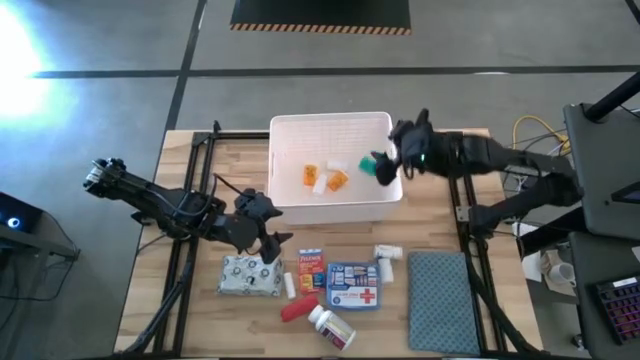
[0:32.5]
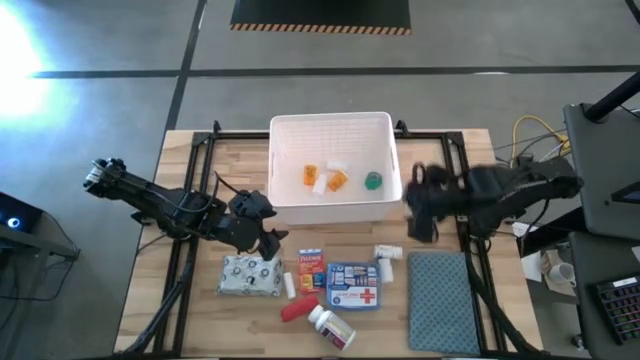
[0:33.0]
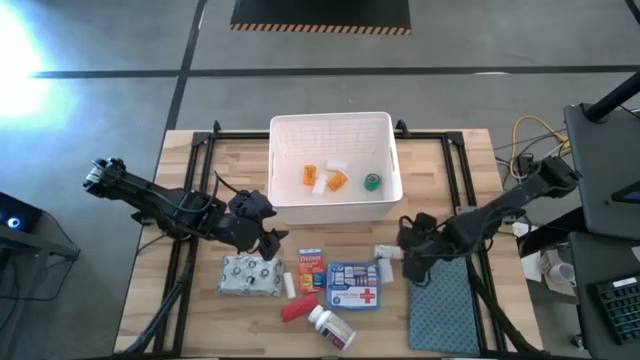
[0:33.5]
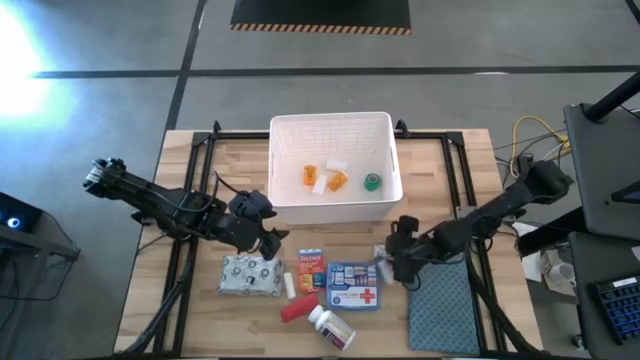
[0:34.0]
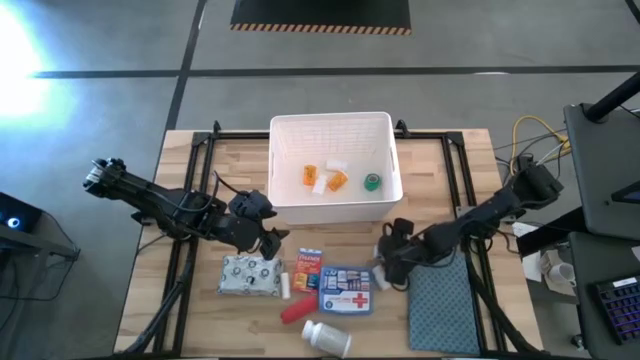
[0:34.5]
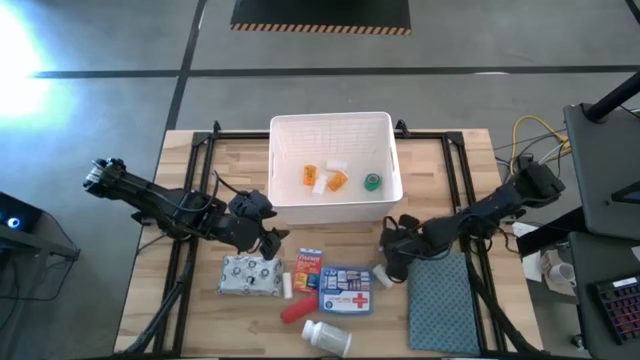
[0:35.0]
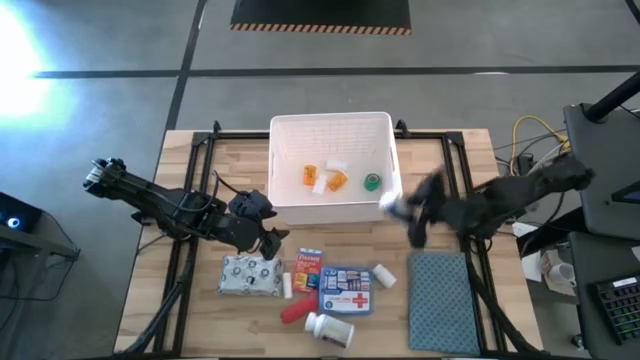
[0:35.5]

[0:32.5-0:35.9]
Task: Pick & place medical supplies in basket/bin
Put the white pill bottle into the white bin

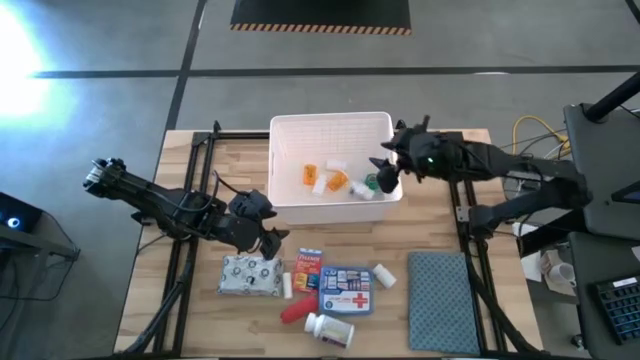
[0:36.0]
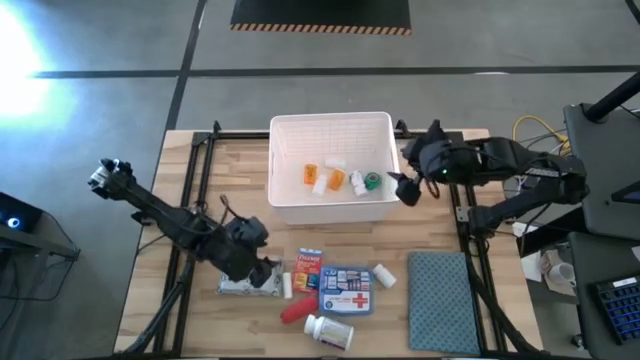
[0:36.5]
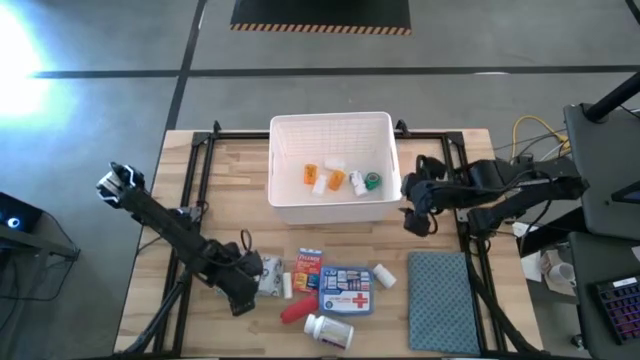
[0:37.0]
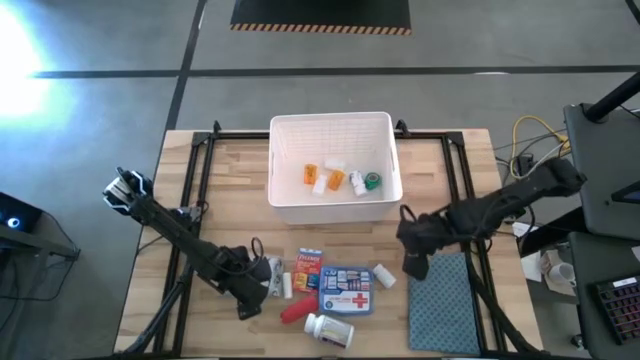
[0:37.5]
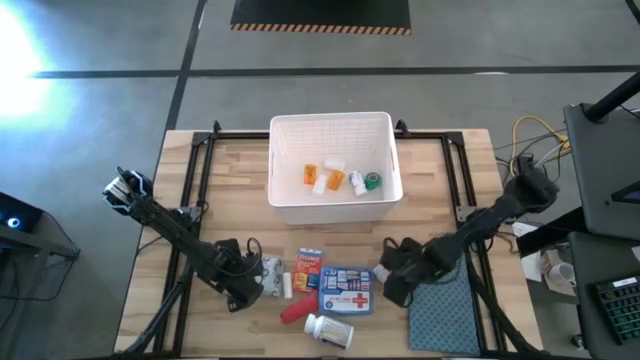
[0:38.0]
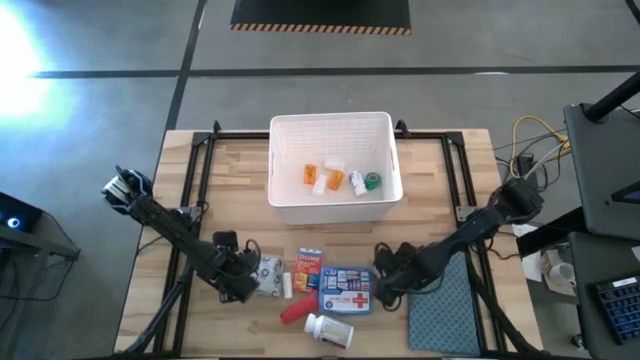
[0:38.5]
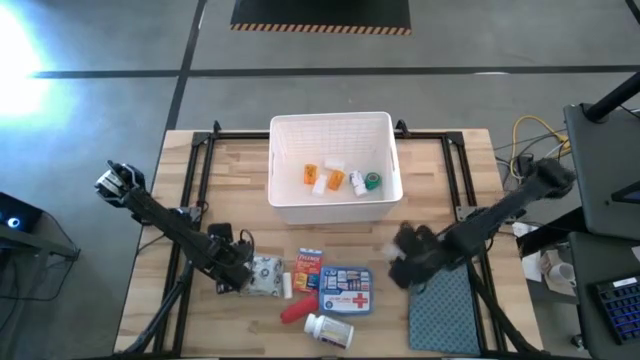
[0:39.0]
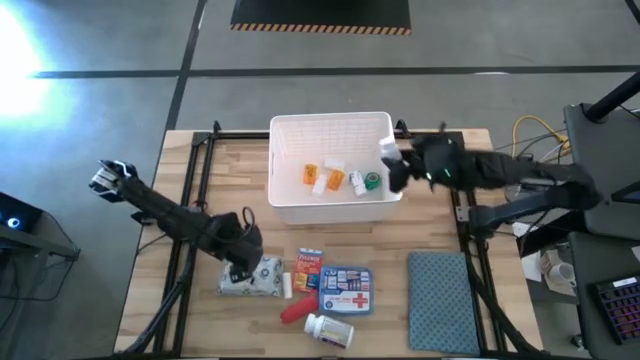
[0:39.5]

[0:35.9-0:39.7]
Put the white pill bottle into the white bin

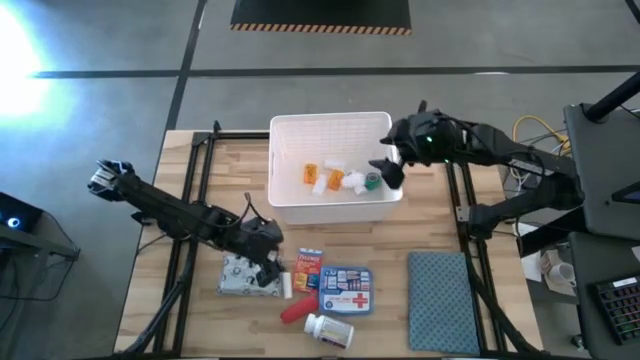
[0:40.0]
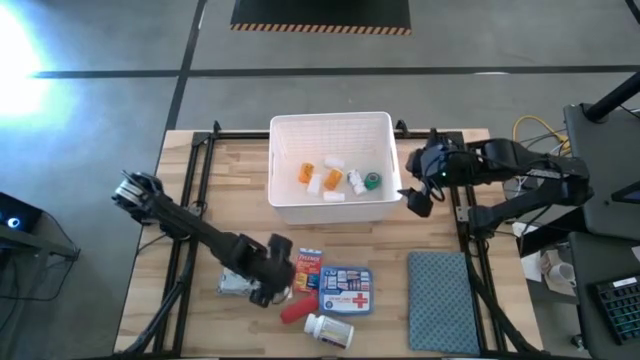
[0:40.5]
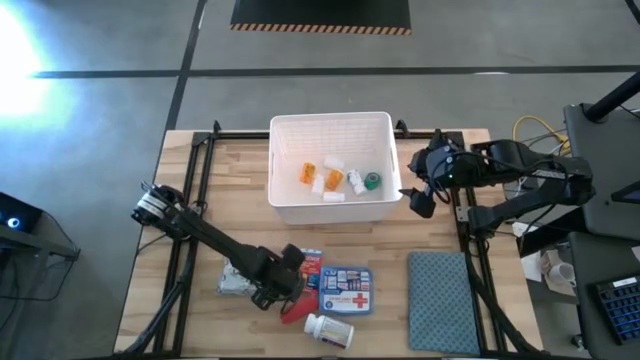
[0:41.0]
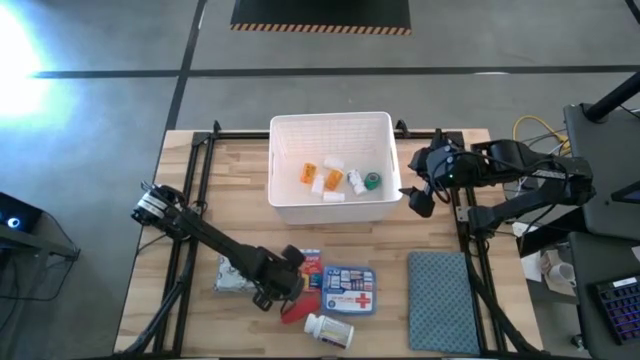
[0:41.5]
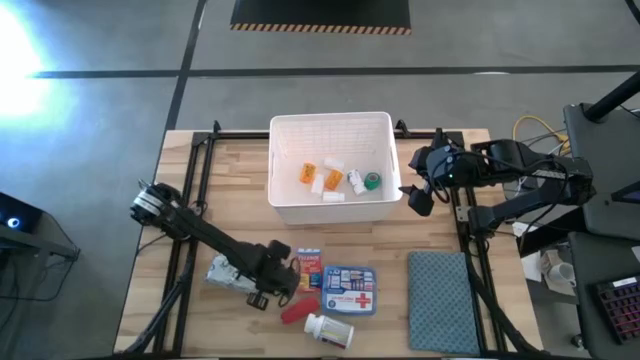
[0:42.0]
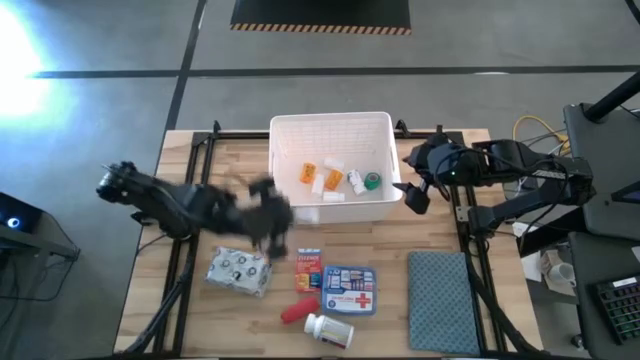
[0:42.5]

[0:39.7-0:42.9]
Put the rolled gauze into the white bin

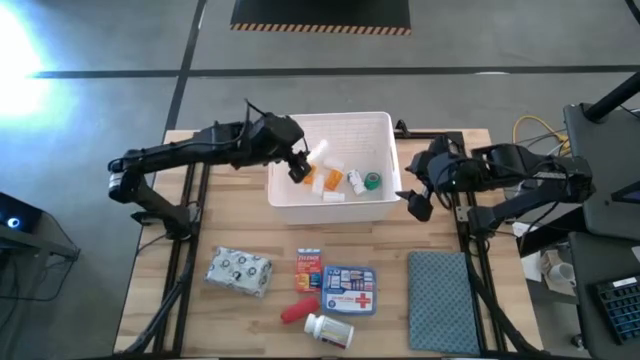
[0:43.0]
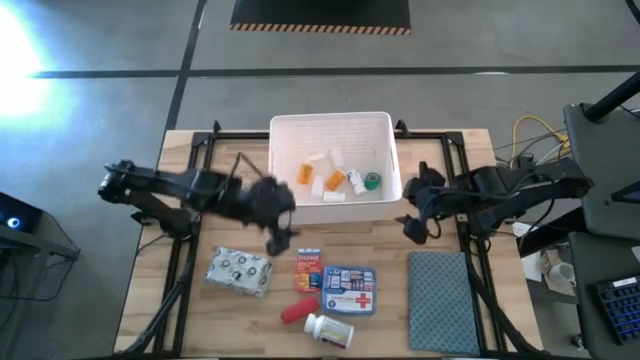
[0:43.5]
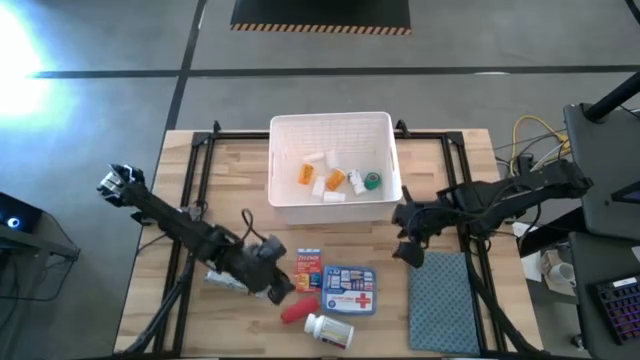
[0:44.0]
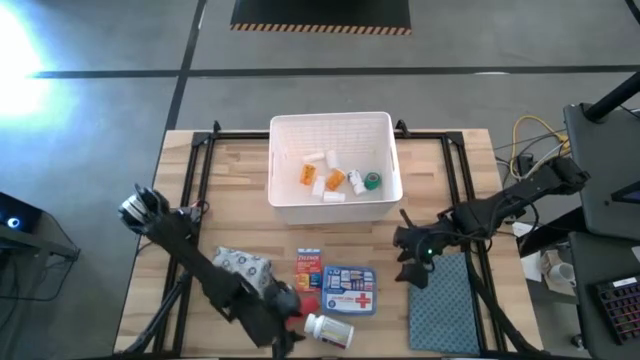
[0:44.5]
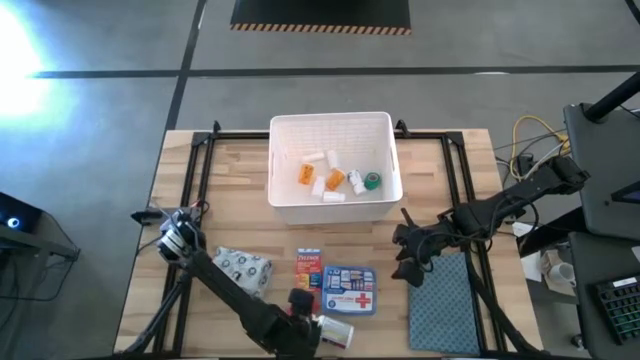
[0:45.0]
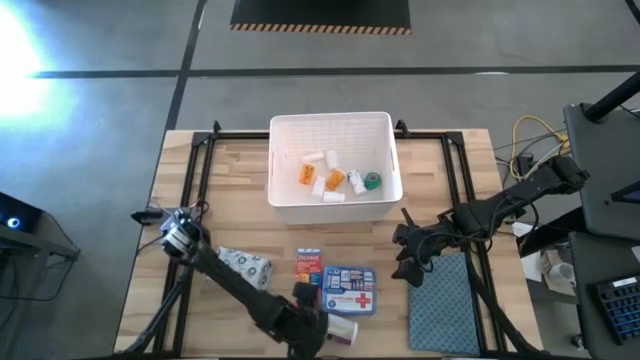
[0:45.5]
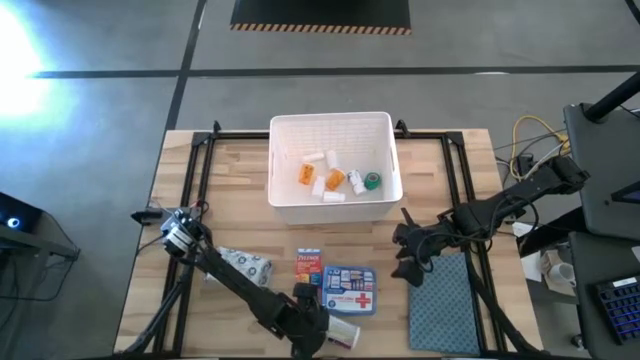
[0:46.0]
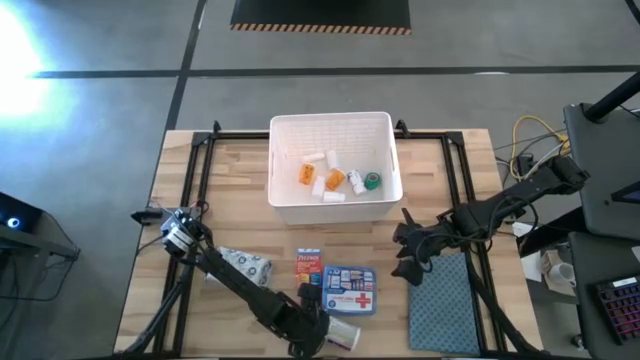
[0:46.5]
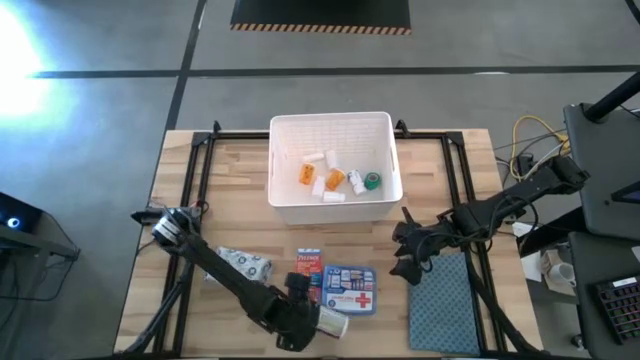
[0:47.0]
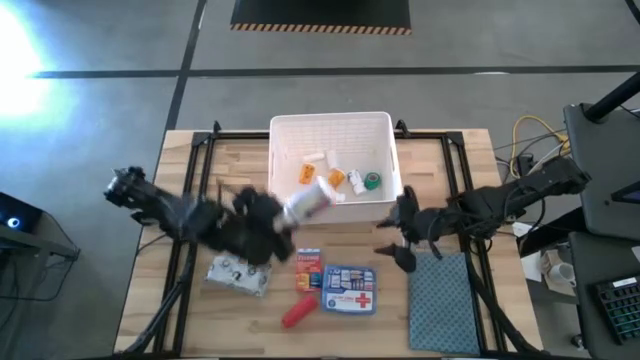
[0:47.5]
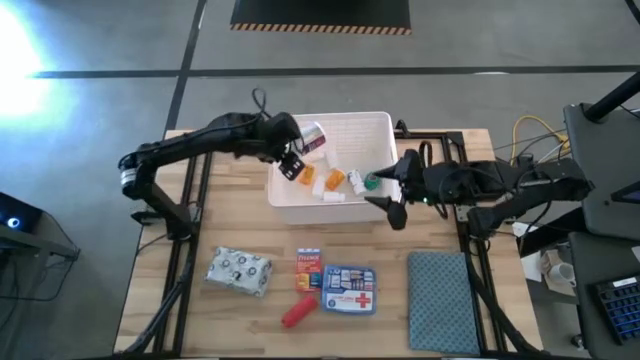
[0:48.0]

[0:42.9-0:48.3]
Put the white and violet pill bottle into the white bin

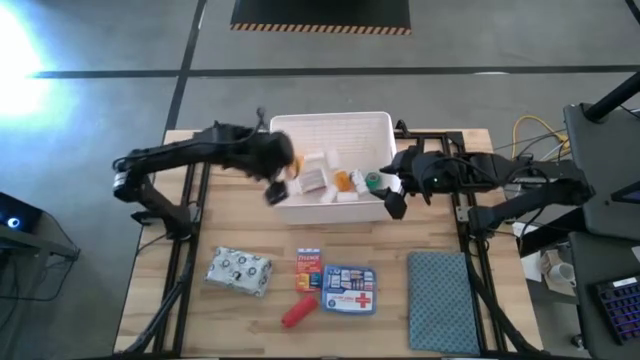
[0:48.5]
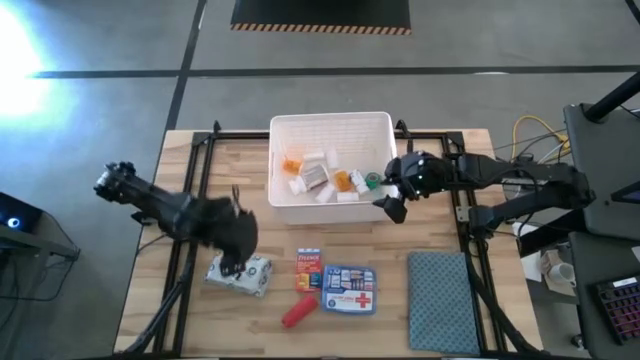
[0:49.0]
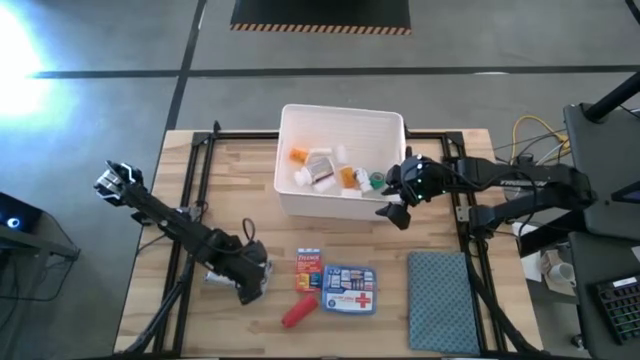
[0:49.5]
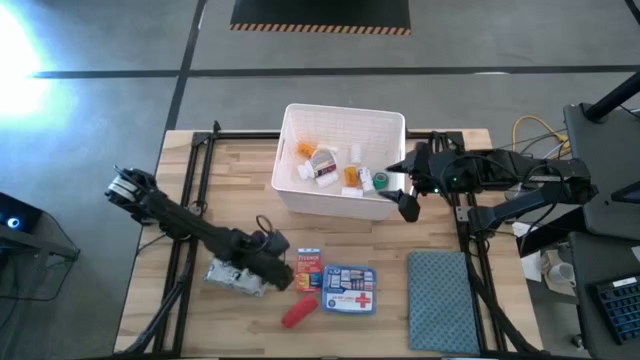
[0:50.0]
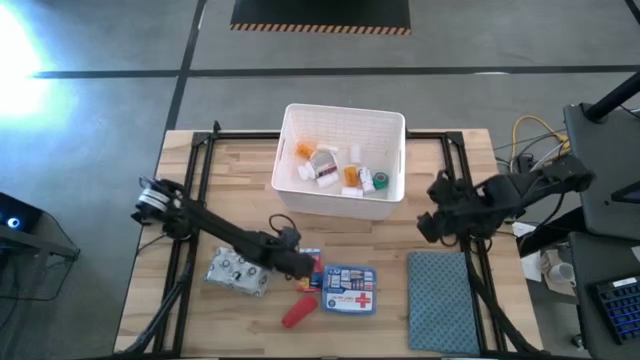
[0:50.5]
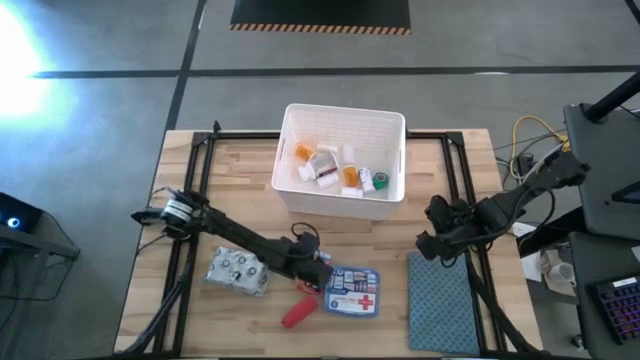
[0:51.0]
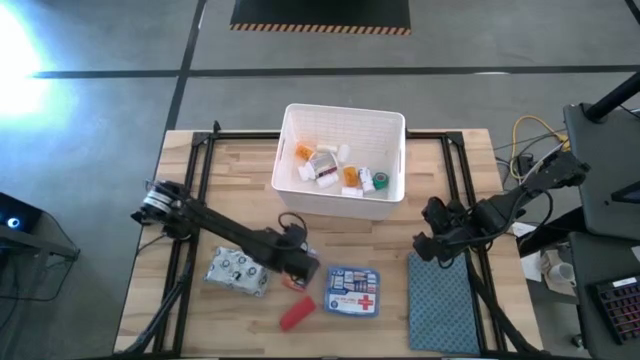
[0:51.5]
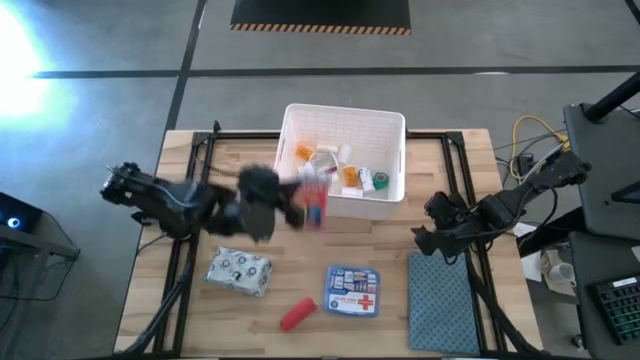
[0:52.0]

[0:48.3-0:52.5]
Put the medicine box into the white bin

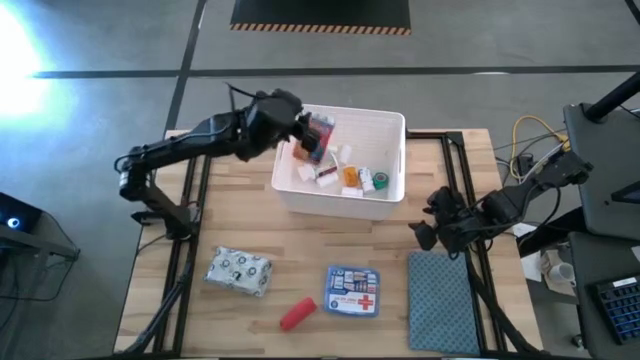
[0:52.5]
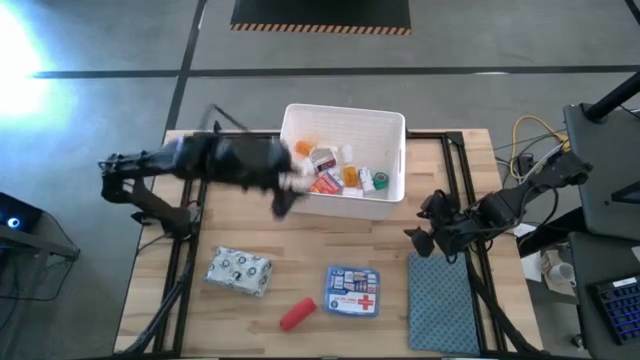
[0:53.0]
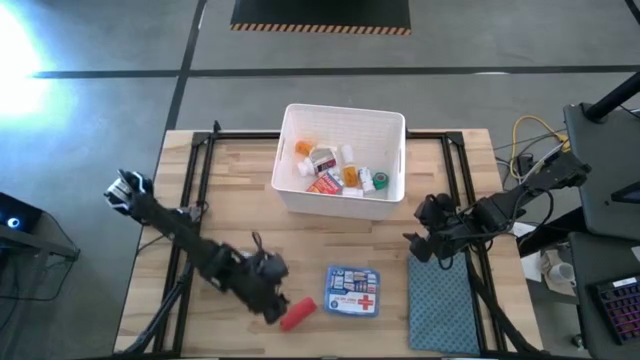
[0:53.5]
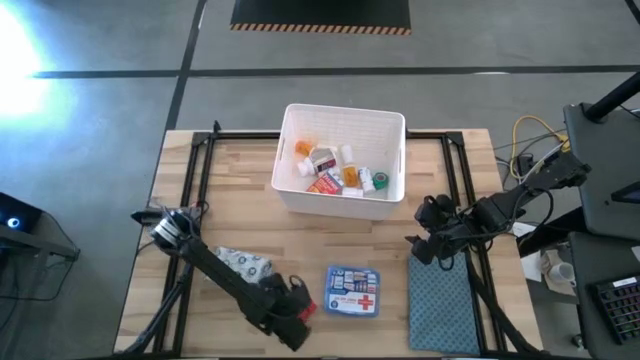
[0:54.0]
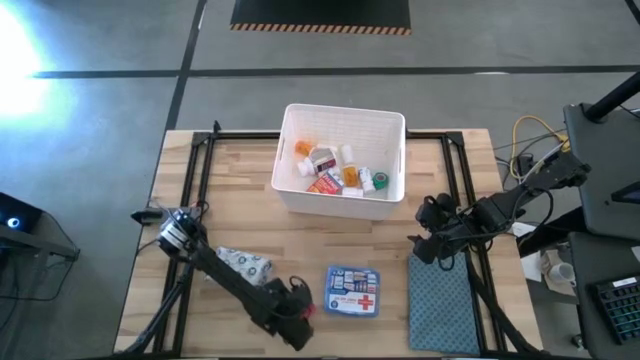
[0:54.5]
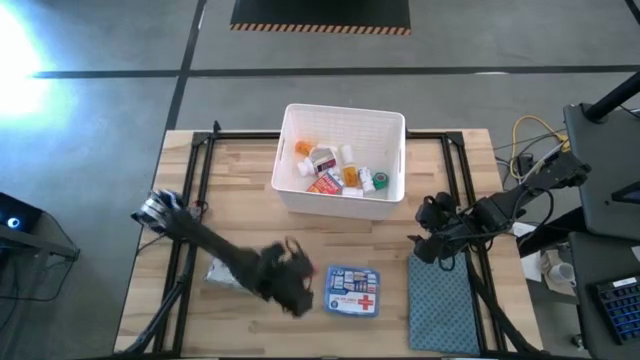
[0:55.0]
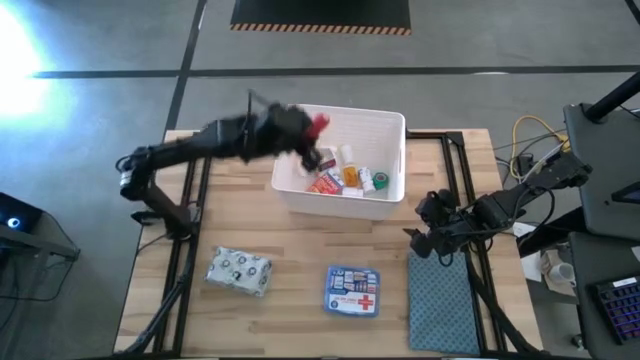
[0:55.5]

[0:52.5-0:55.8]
Put the red bandage into the white bin
